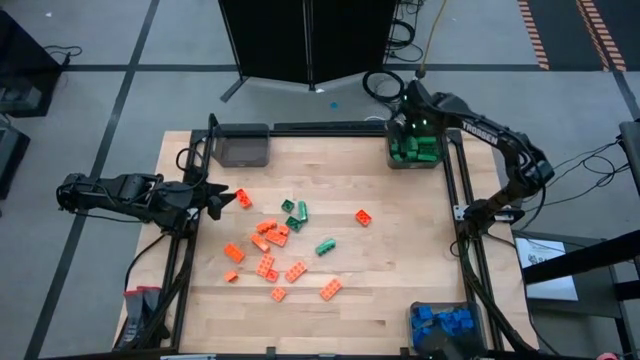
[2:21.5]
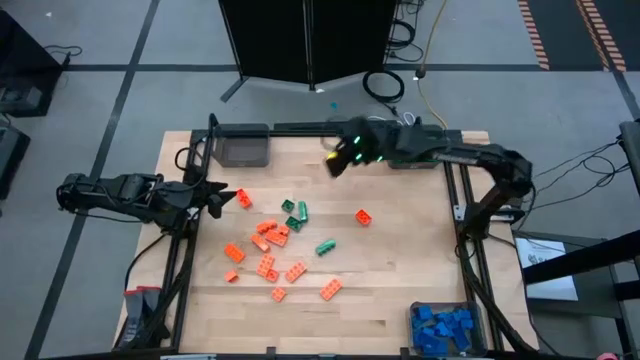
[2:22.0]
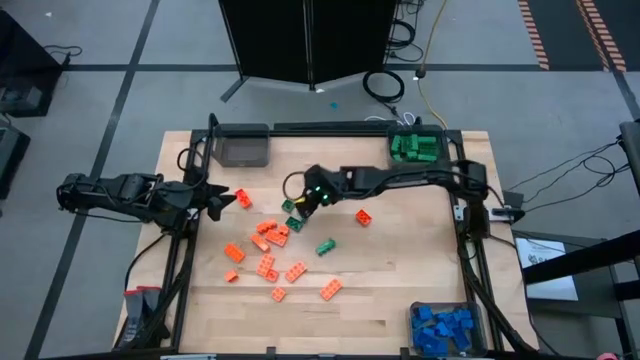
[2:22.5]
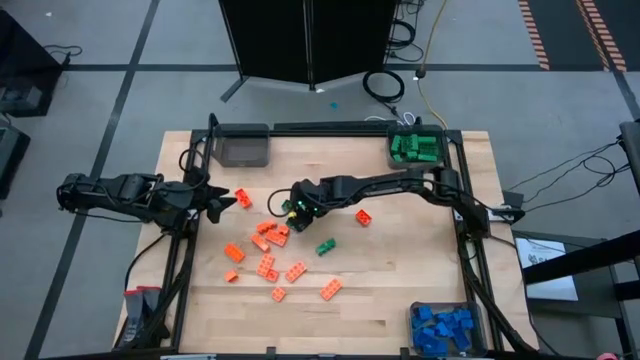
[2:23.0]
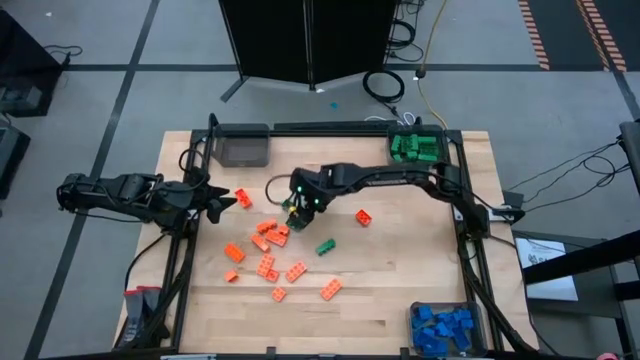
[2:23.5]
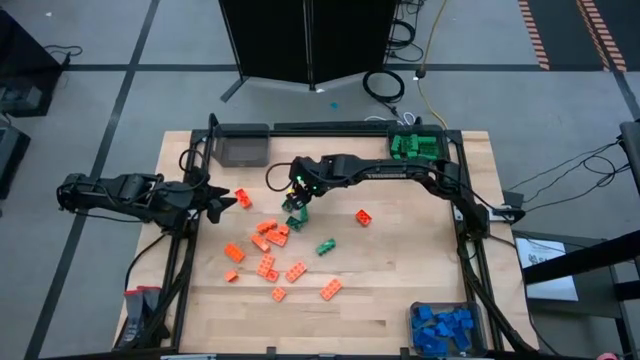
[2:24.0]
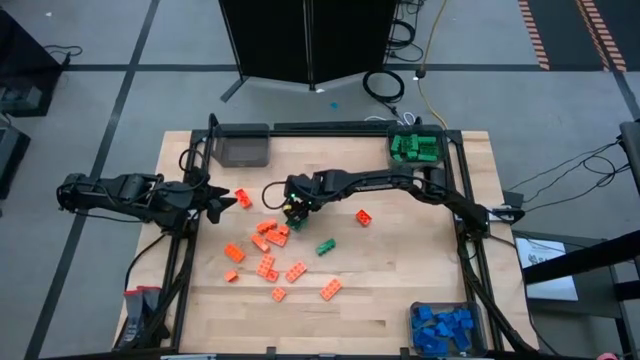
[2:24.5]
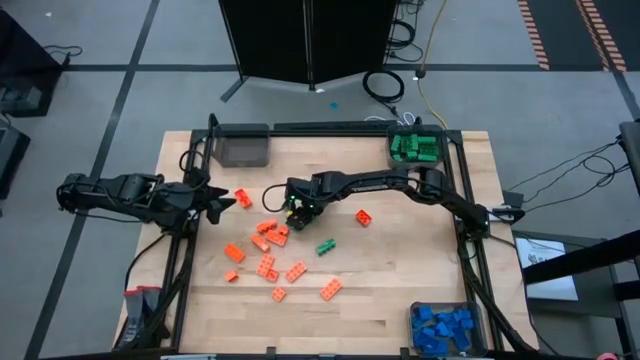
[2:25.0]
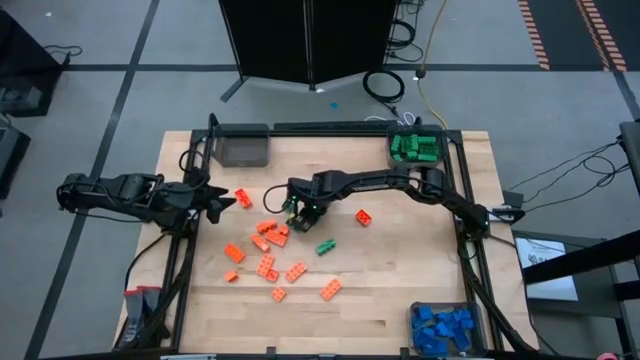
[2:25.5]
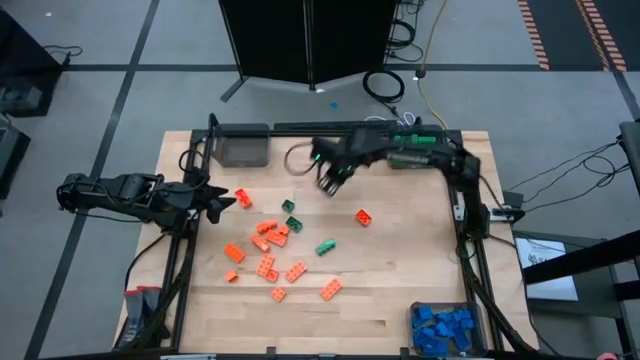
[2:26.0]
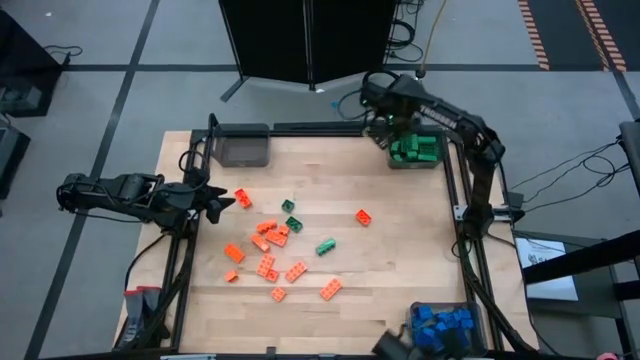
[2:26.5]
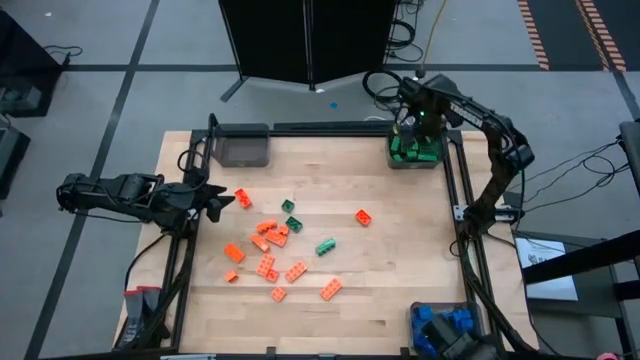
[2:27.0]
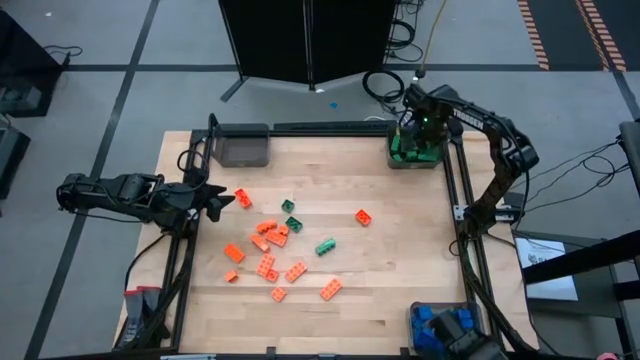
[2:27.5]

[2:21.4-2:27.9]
Task: Sort blocks
Put the green game piece into the top right black bin

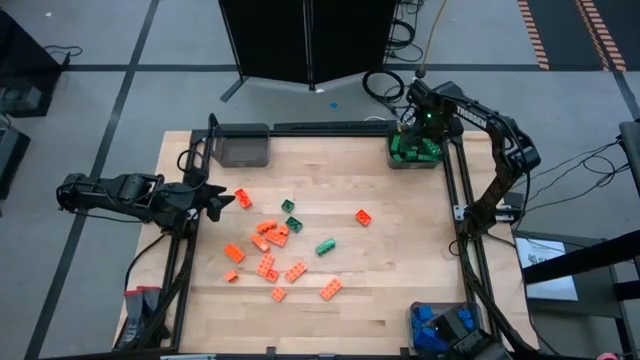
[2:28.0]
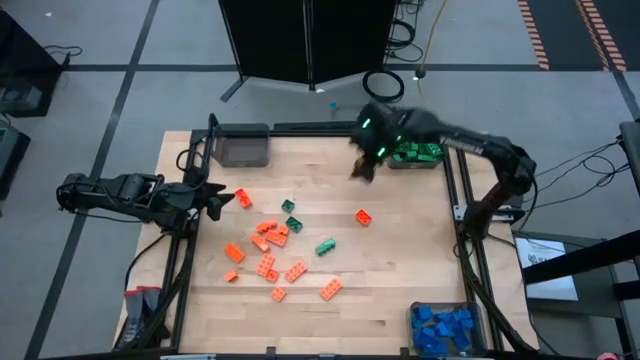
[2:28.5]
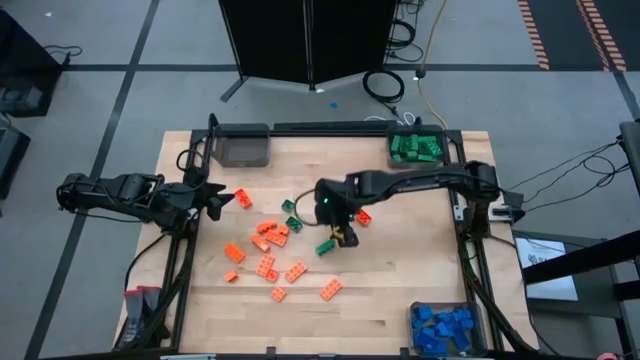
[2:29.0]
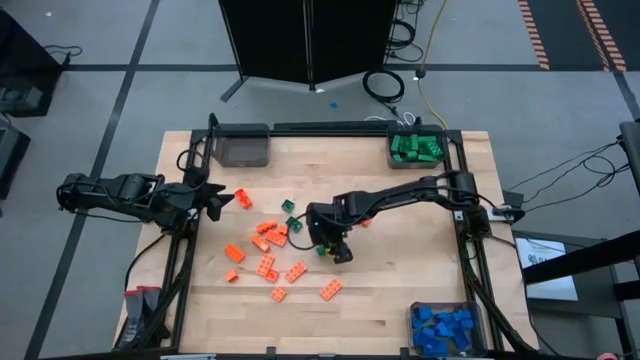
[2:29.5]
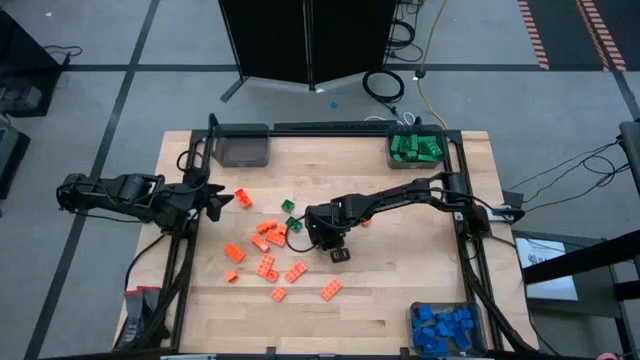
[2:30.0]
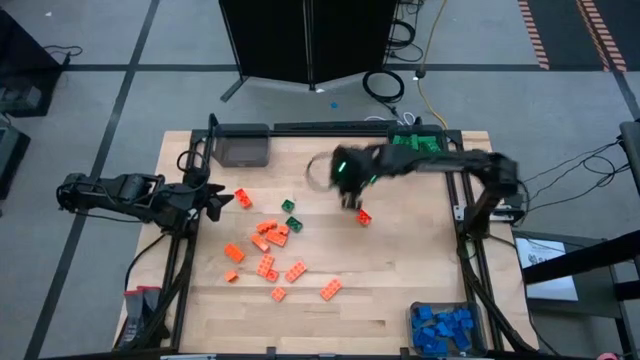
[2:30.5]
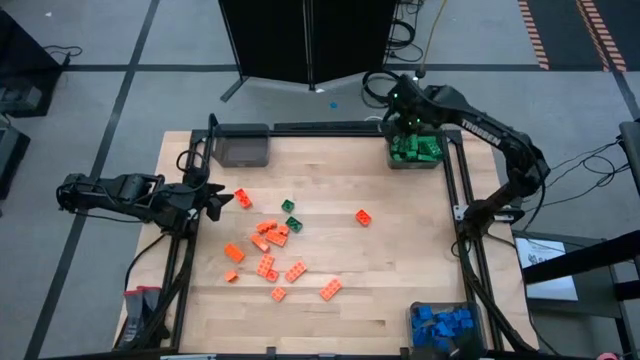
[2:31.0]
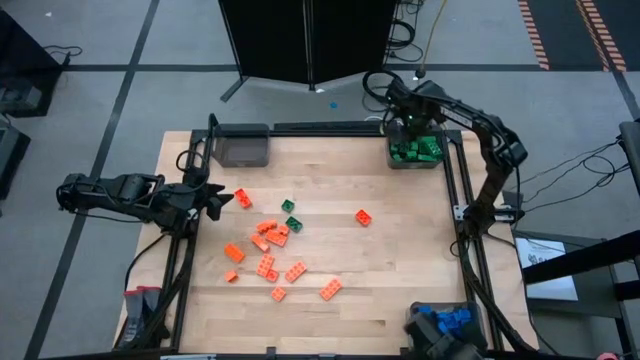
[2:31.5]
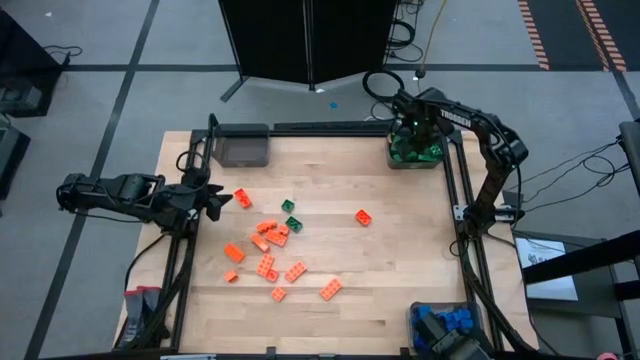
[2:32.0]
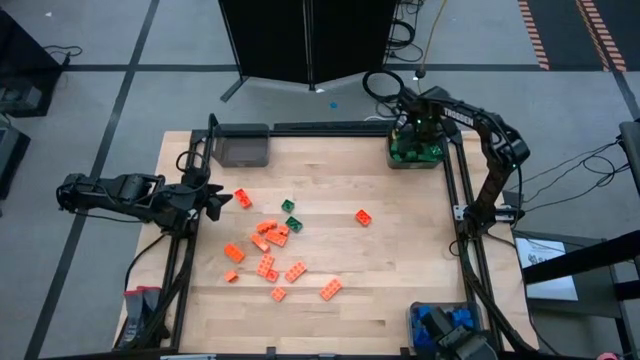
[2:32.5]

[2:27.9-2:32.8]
Put the green game piece into the top right black bin

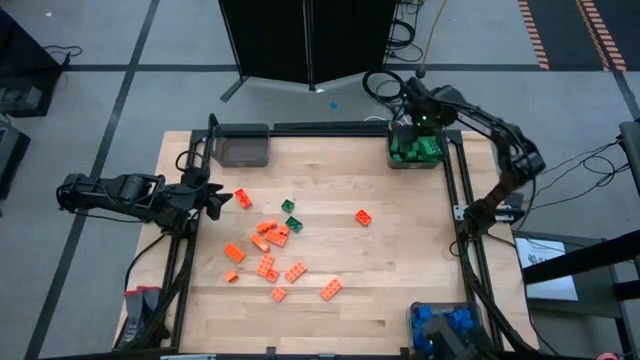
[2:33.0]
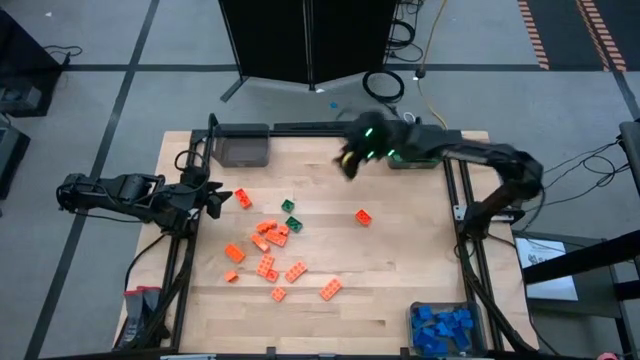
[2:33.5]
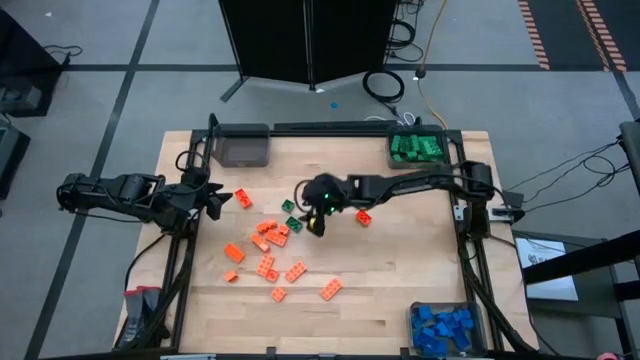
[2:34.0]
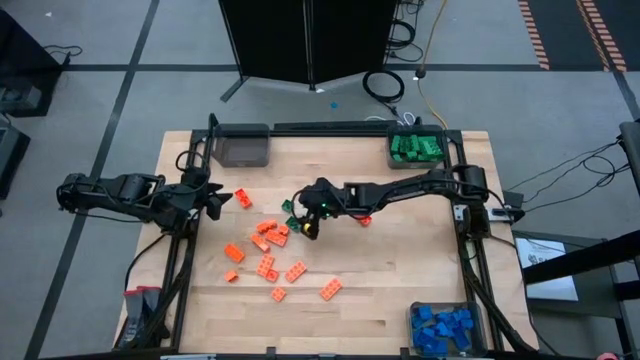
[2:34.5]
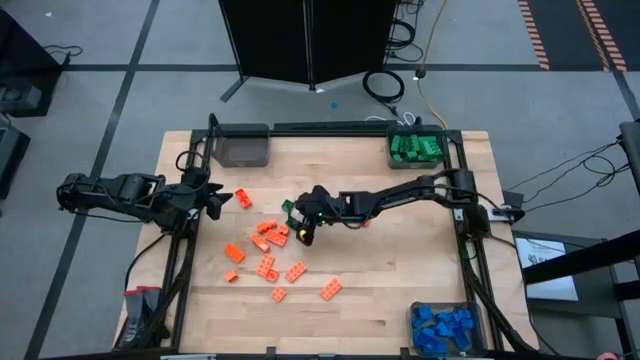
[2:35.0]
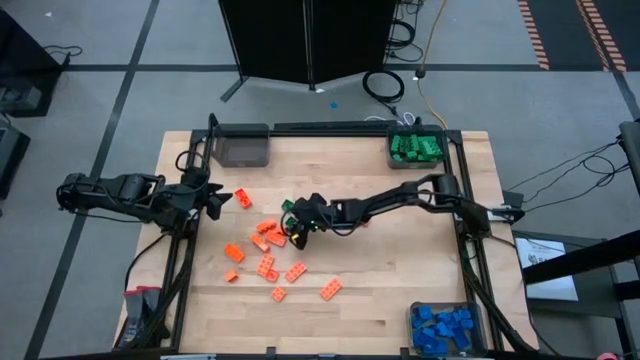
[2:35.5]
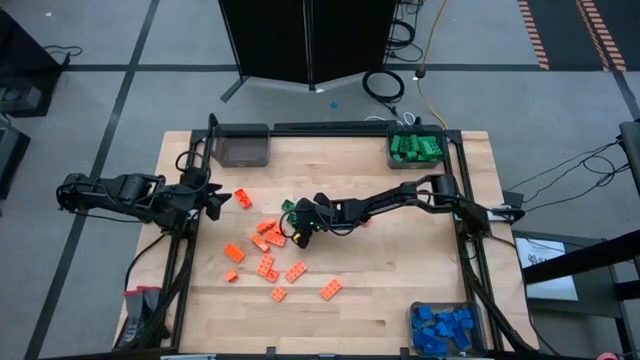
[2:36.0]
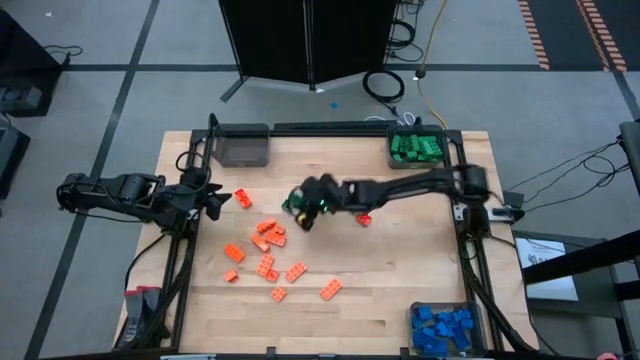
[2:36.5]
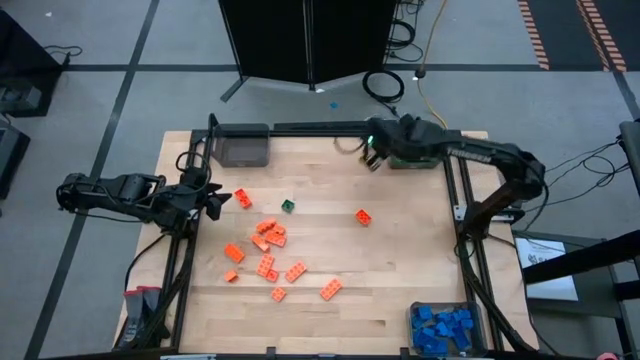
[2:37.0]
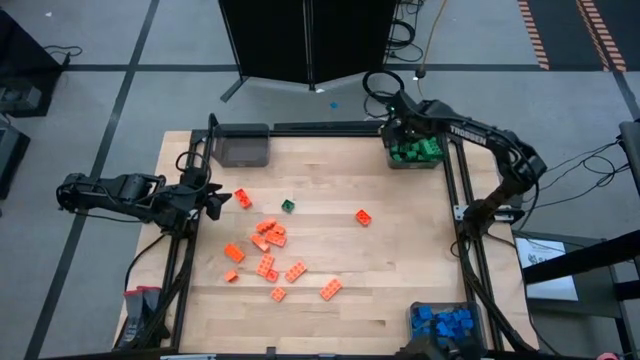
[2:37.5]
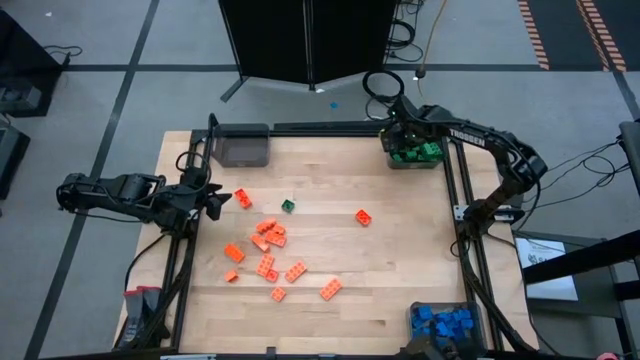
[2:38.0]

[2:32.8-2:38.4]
Put the green game piece into the top right black bin

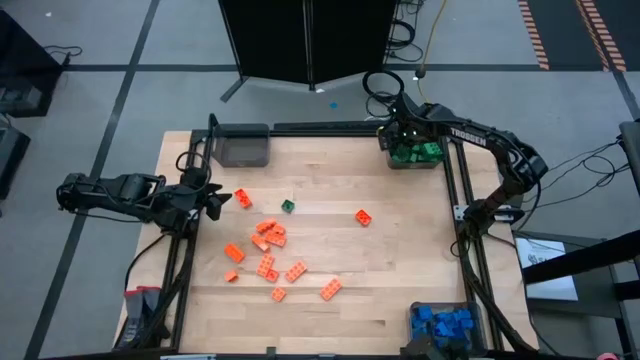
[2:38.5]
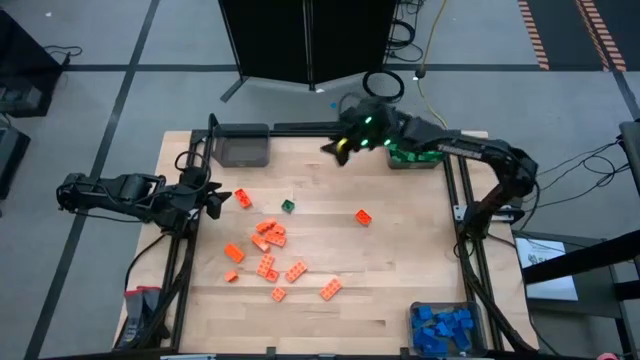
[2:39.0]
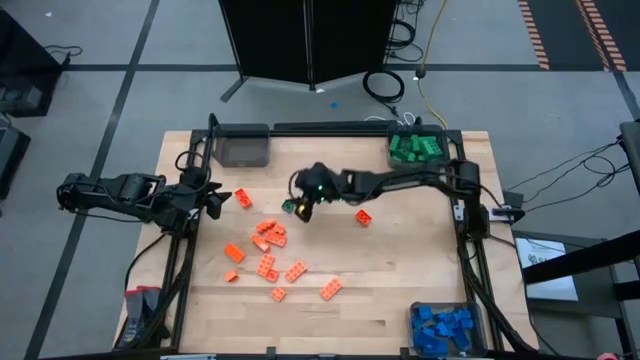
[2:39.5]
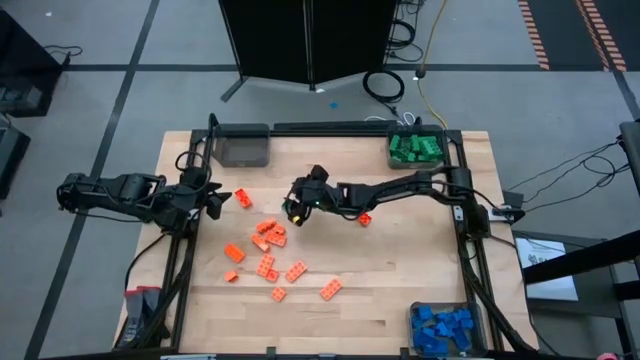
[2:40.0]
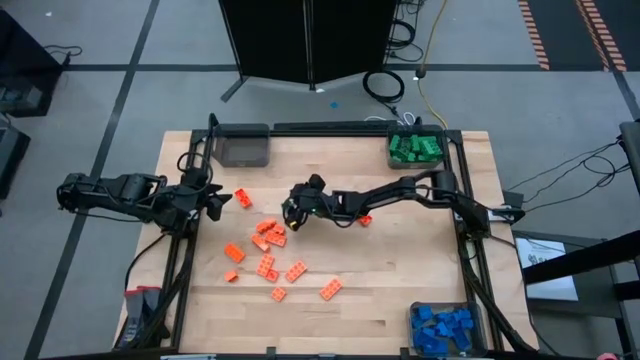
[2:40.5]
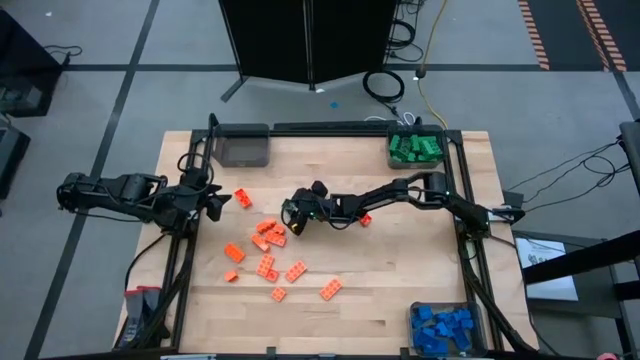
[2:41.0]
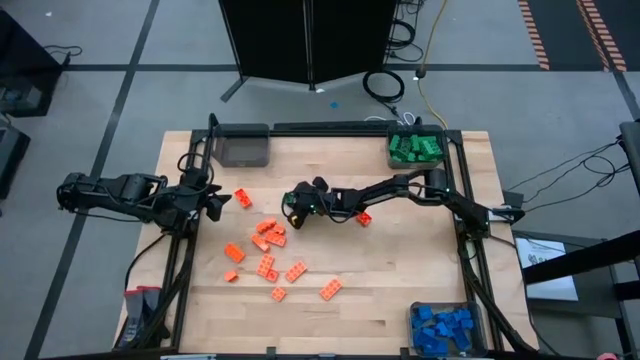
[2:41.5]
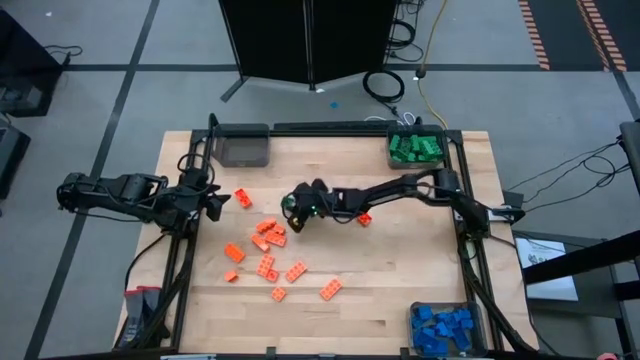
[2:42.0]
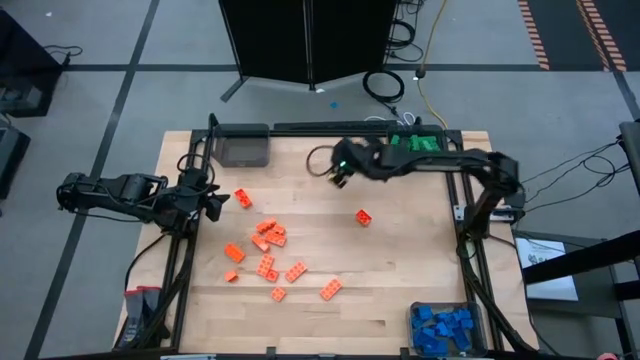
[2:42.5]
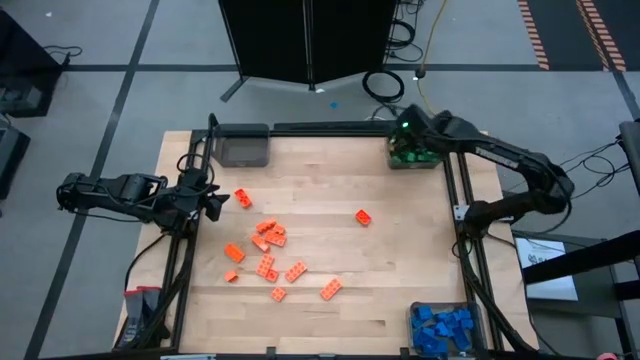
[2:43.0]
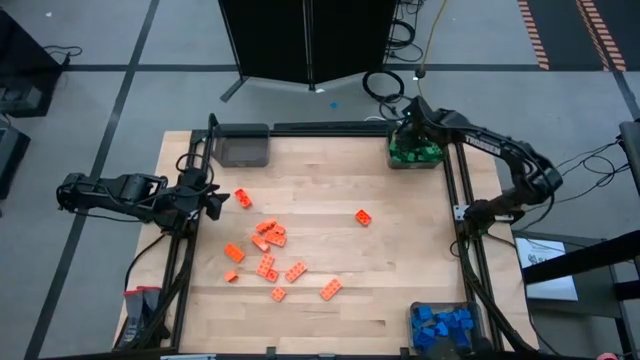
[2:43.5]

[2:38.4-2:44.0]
Put the green game piece into the top right black bin
